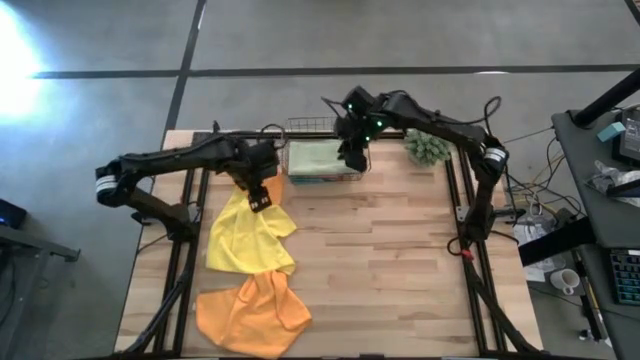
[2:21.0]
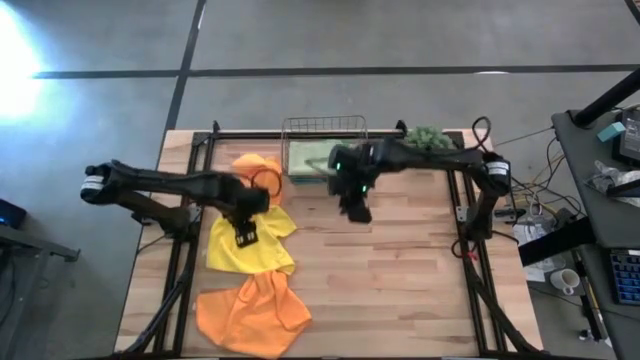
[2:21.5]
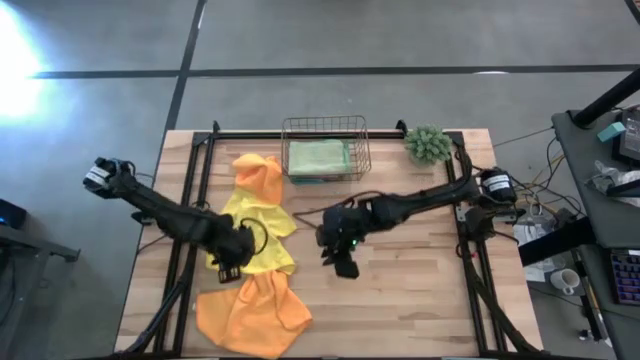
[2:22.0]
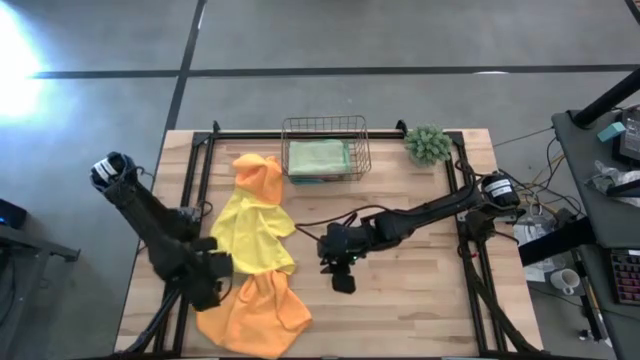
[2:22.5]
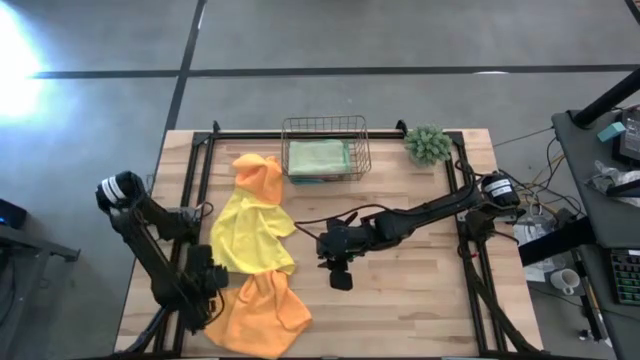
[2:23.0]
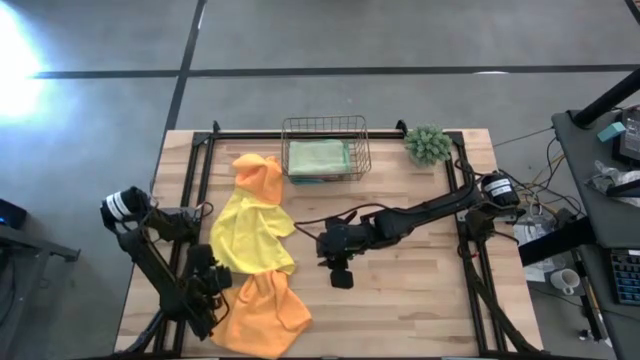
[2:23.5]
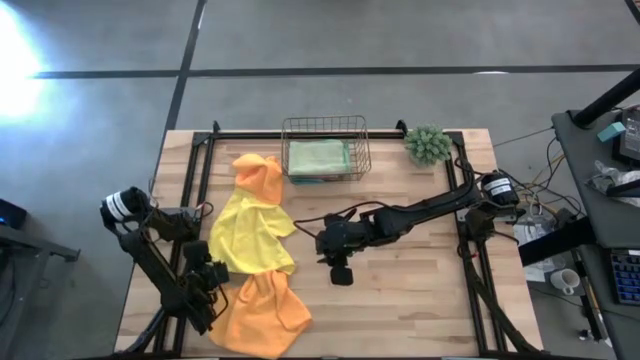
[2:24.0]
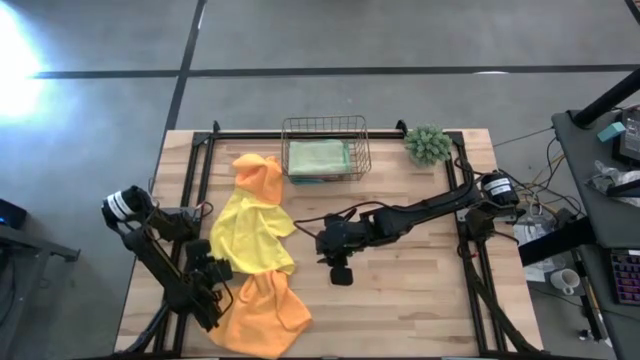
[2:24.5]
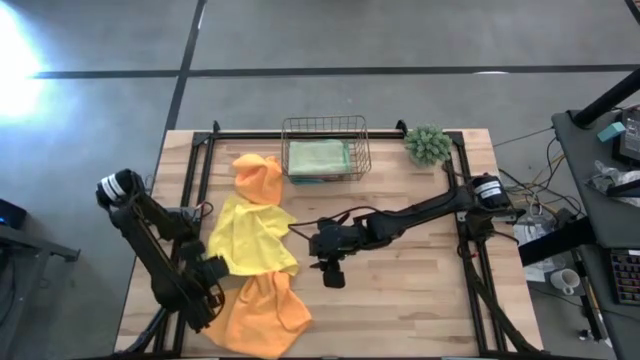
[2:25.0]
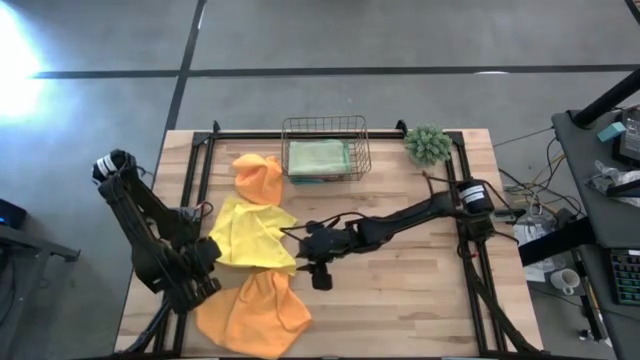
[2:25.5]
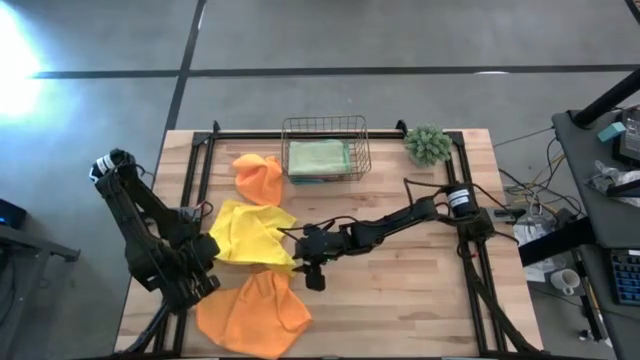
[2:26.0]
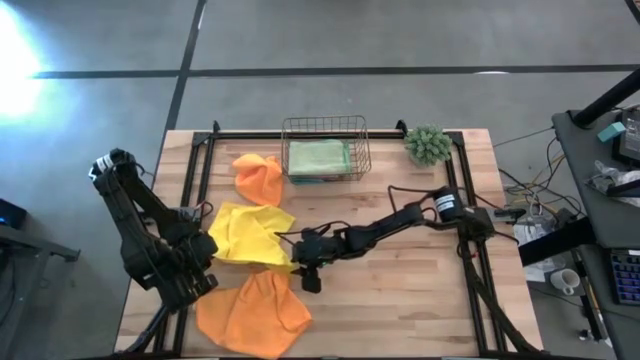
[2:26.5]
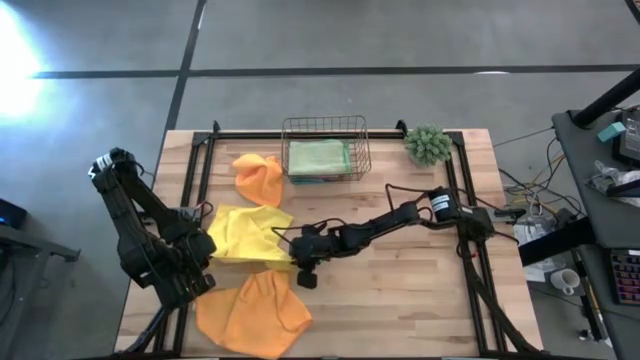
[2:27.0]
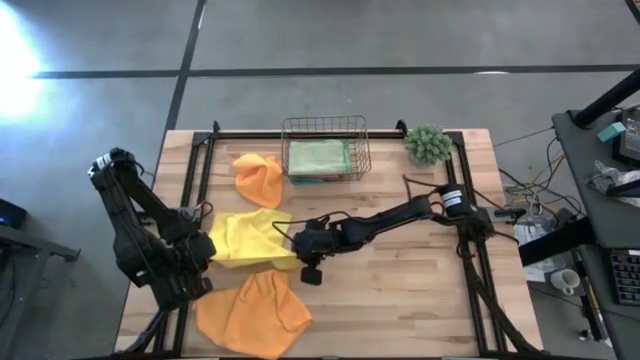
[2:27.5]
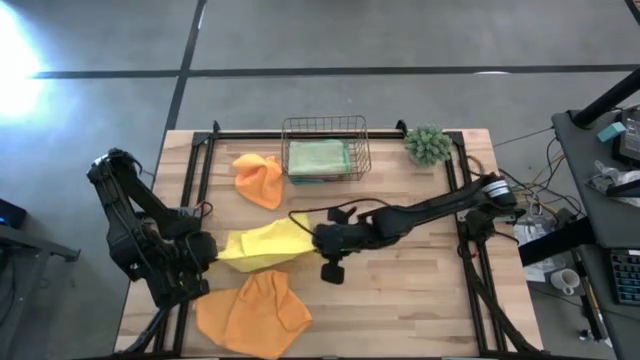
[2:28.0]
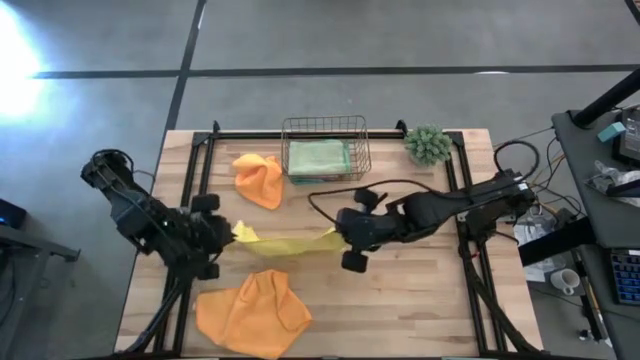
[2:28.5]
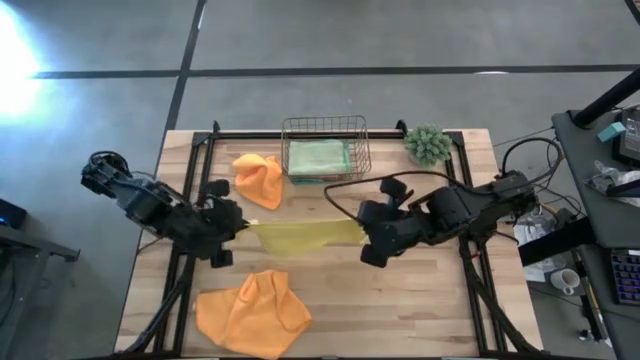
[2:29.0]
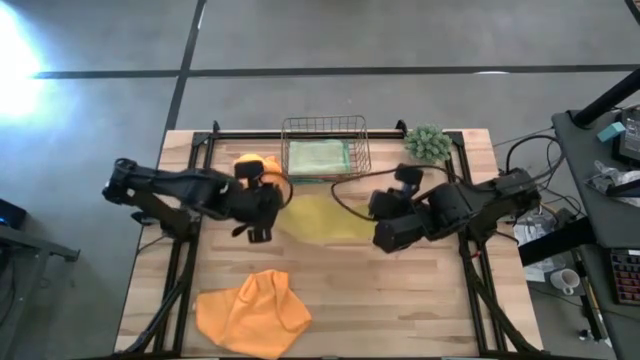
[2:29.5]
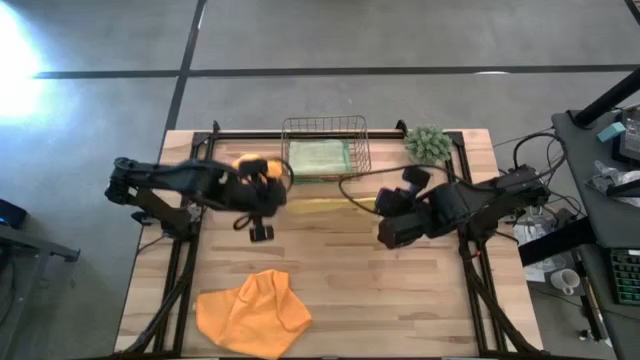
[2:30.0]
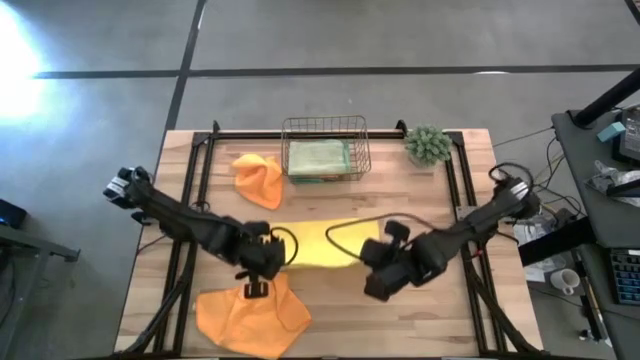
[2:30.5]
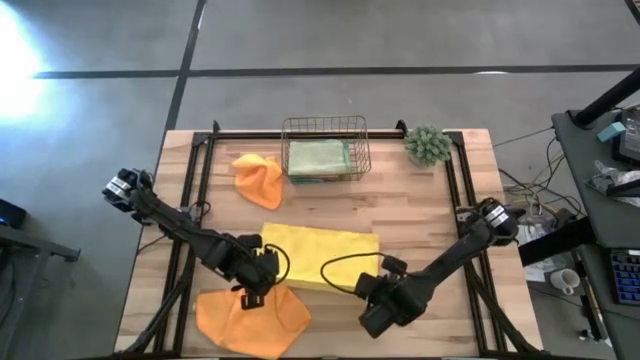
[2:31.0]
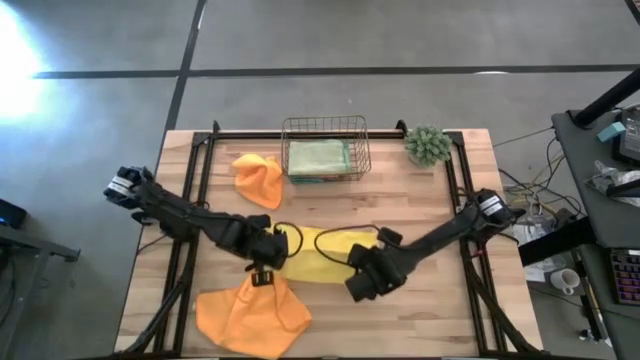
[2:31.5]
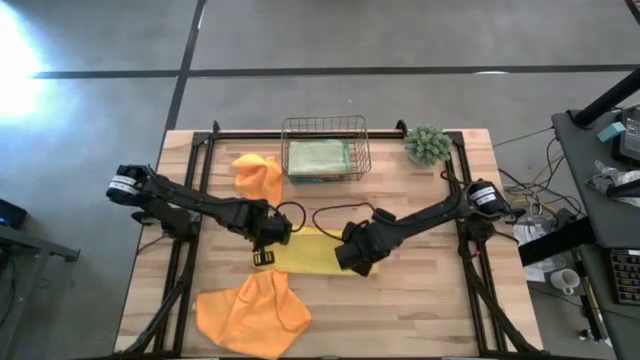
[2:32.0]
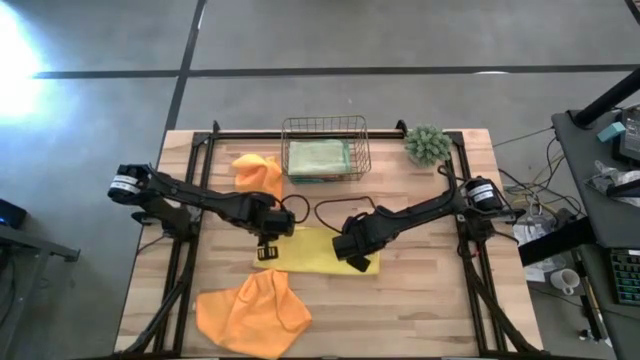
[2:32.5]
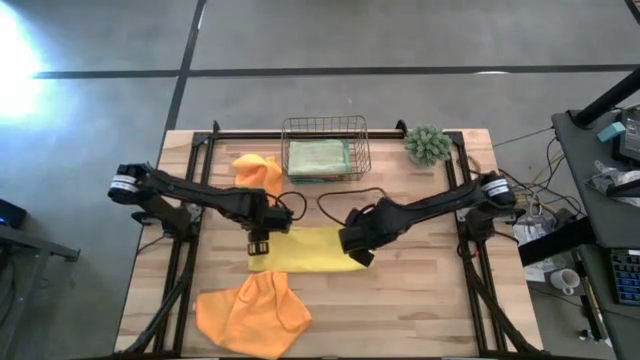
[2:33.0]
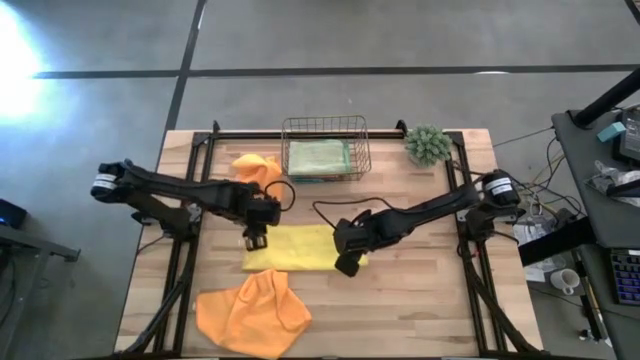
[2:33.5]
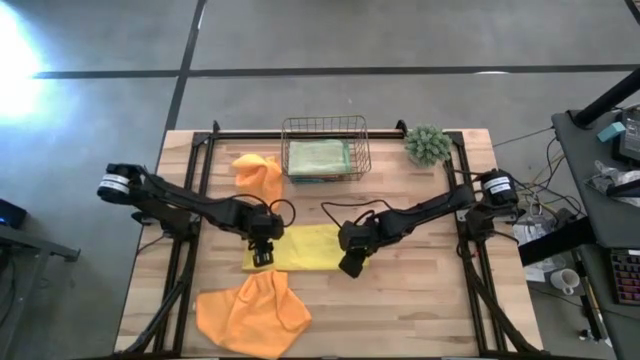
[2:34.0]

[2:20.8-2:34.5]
Task: Fold microfiber towels
Fold the yellow microfiber cloth

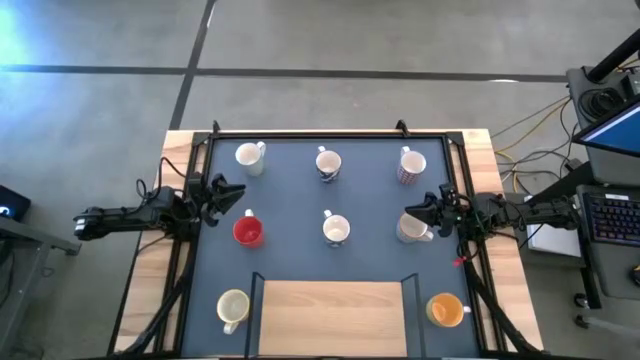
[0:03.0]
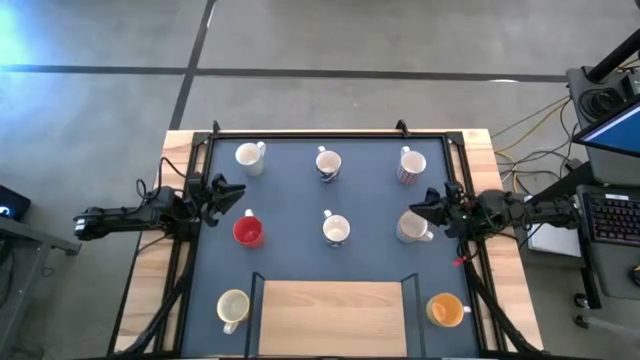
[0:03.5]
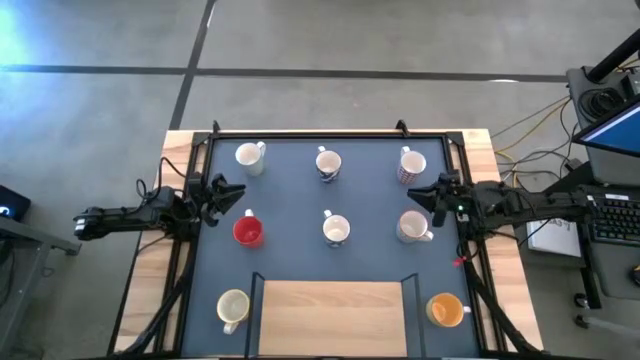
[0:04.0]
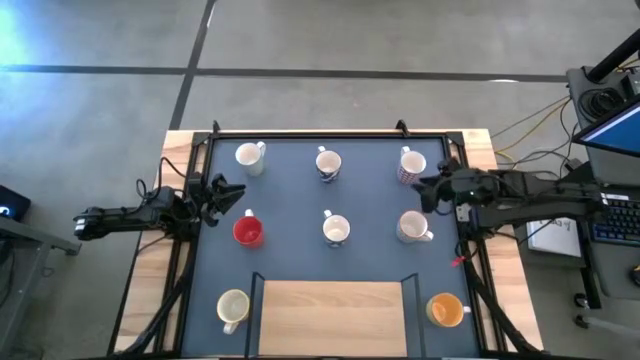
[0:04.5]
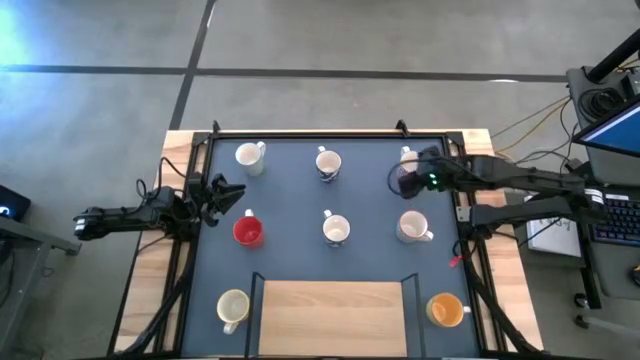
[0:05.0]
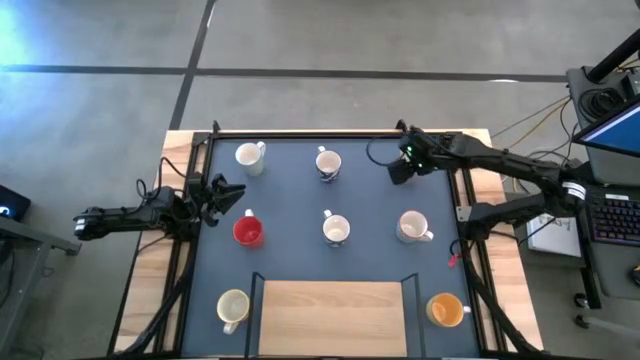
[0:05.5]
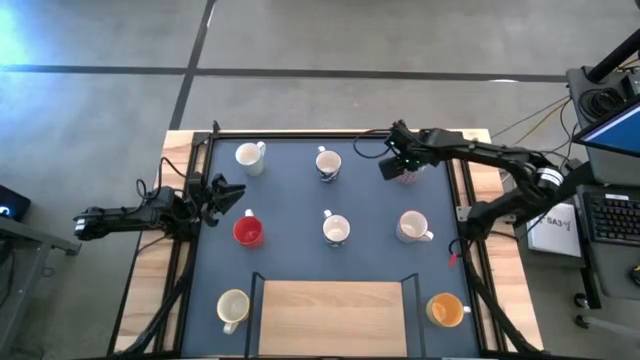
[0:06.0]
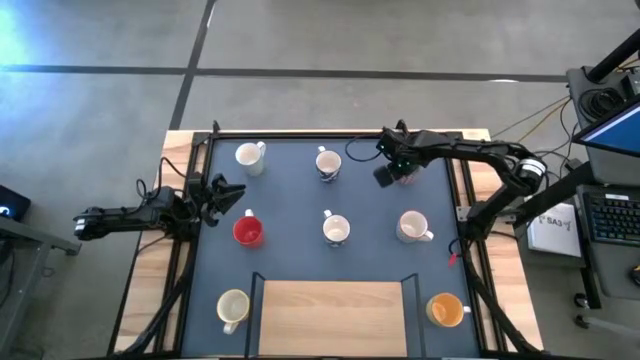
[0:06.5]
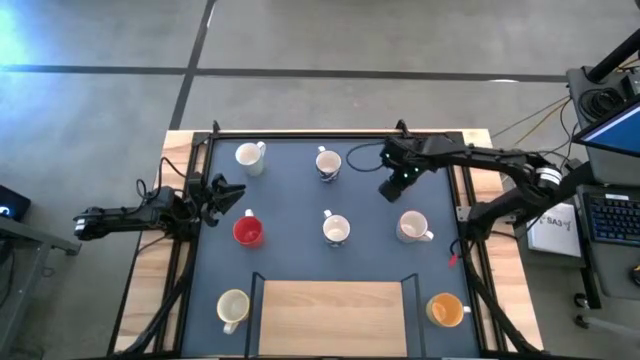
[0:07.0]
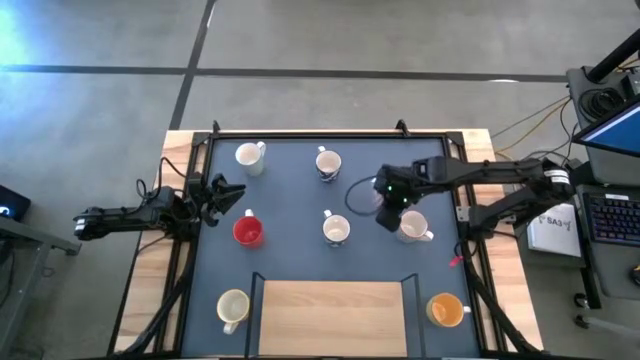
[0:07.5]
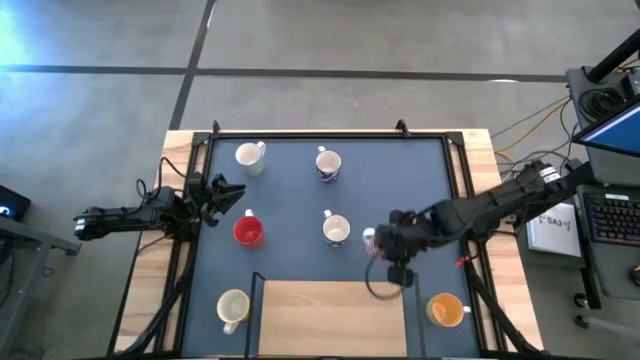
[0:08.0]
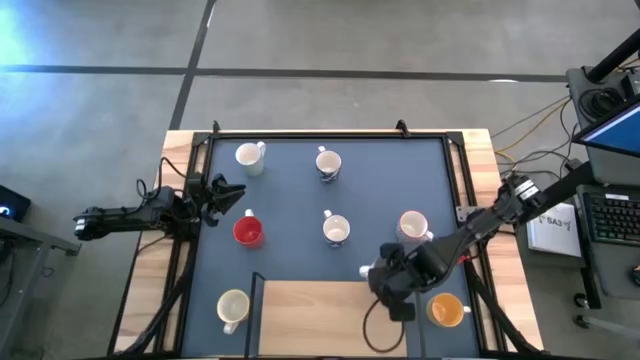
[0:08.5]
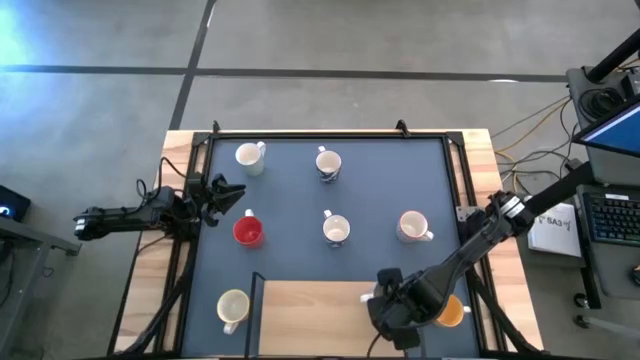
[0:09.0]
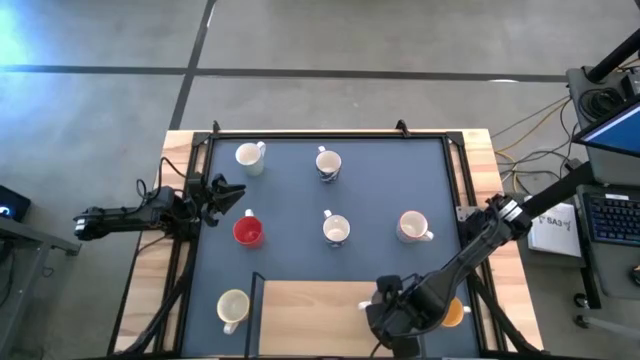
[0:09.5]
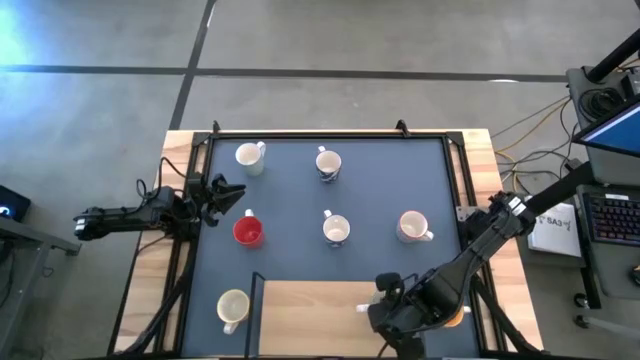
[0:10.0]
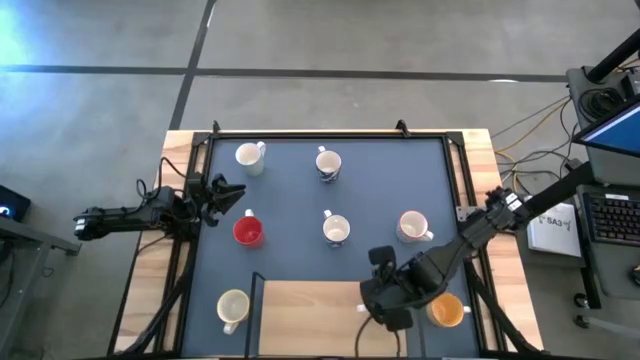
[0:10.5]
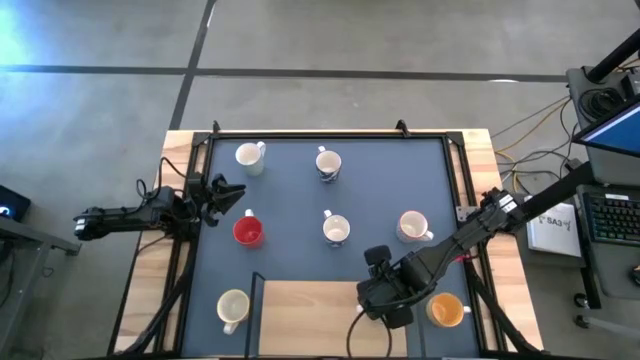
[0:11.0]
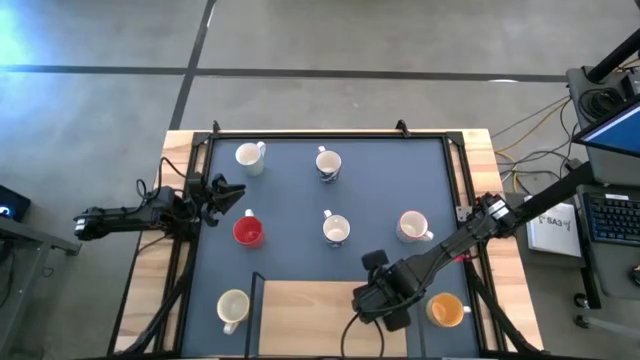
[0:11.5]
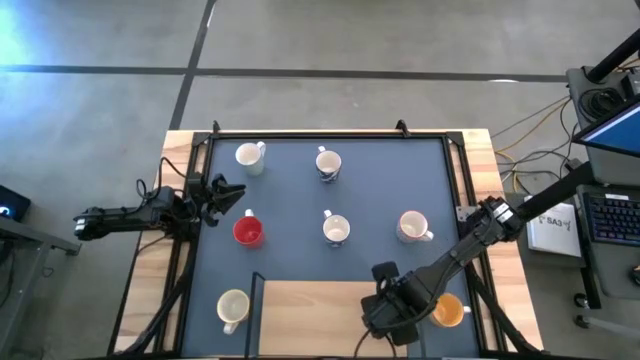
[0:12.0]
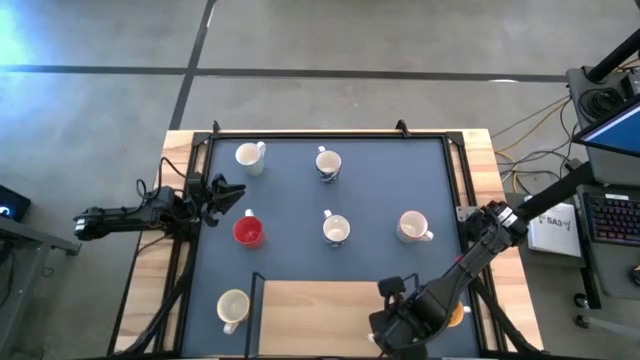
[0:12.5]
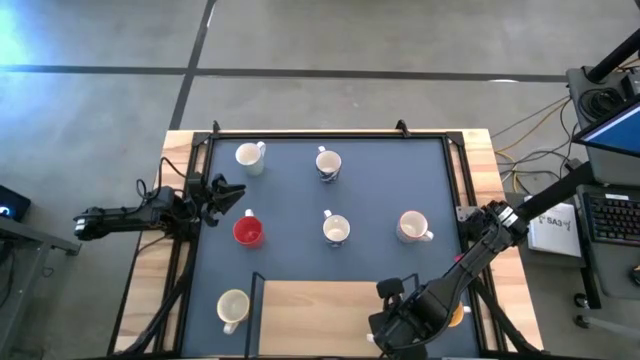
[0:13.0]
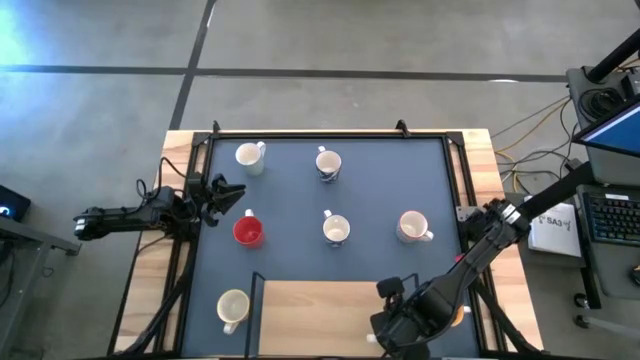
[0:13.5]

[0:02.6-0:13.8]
Task: Place coffee mugs
Put the red patterned mug on the shelf
